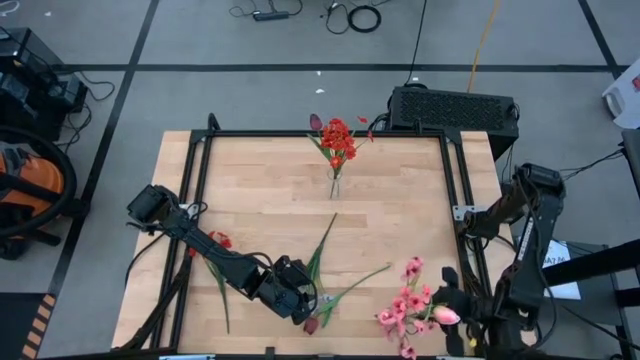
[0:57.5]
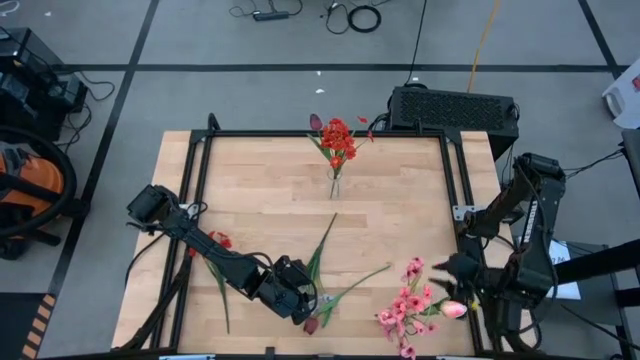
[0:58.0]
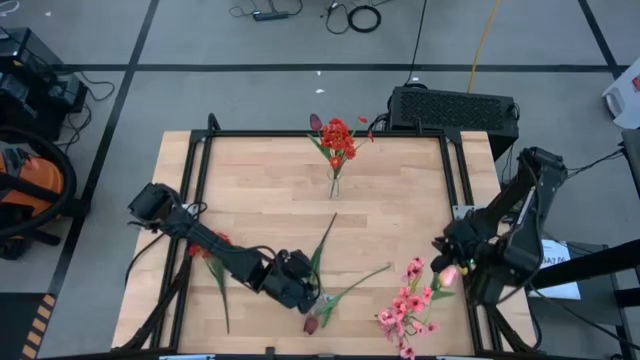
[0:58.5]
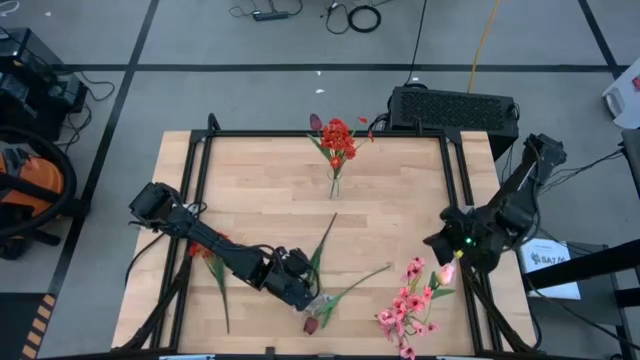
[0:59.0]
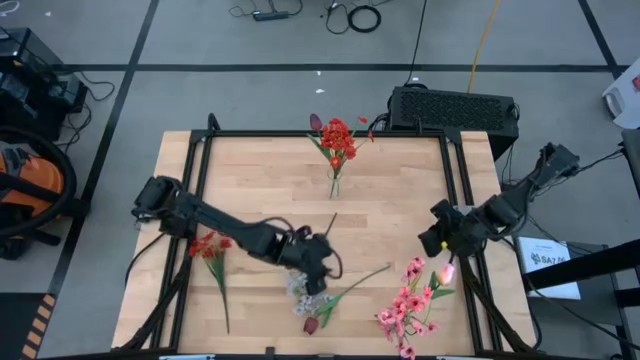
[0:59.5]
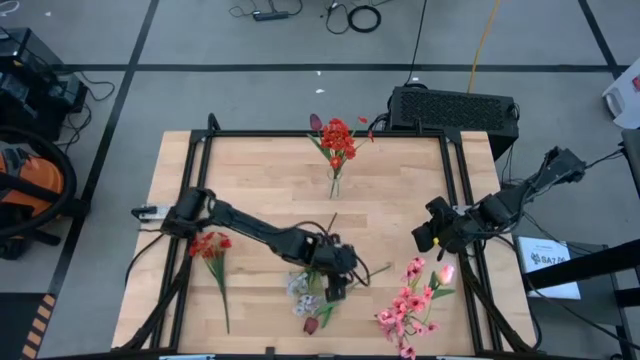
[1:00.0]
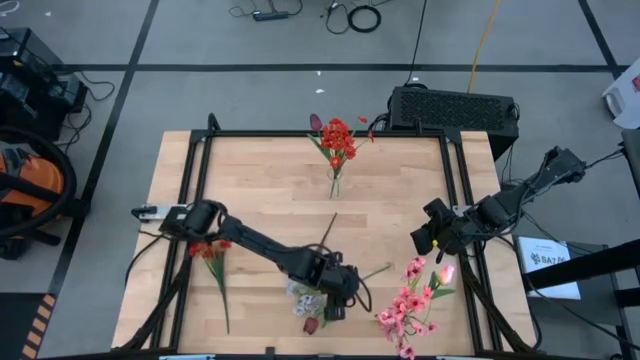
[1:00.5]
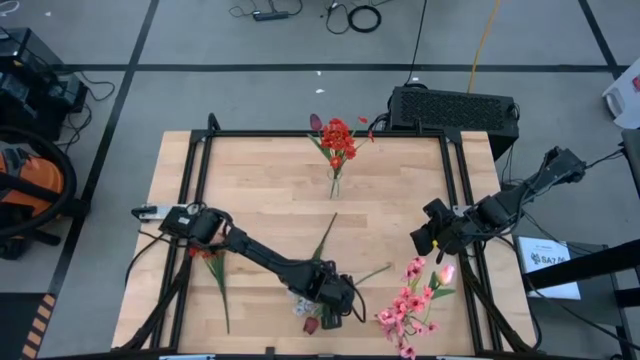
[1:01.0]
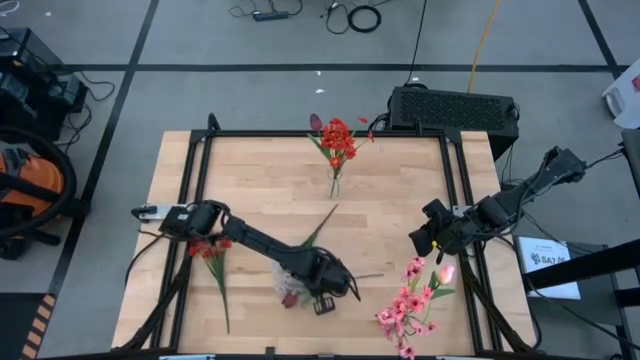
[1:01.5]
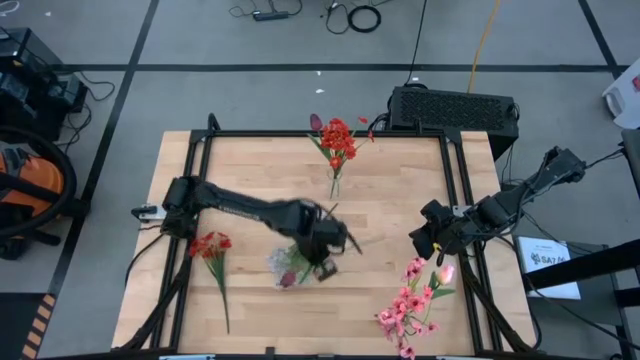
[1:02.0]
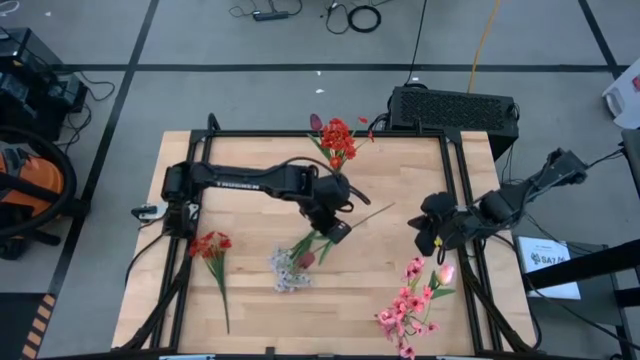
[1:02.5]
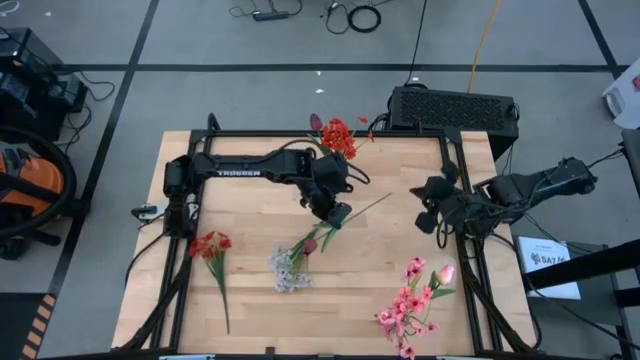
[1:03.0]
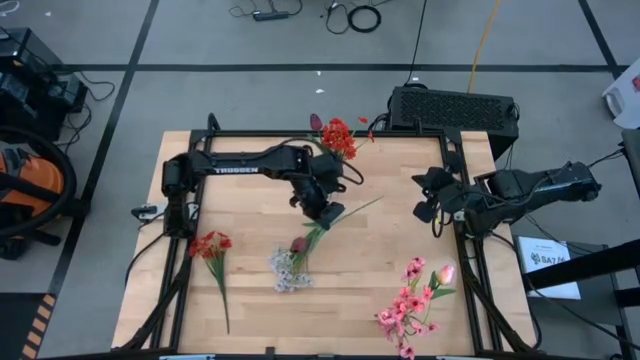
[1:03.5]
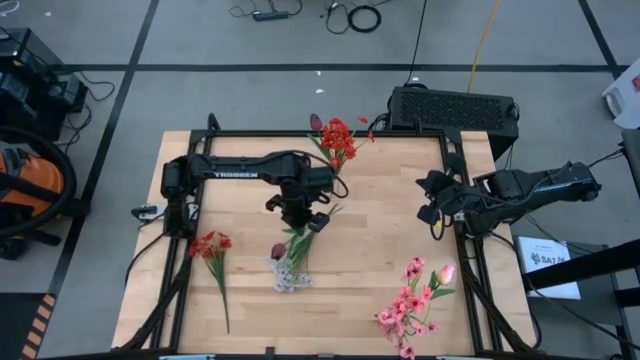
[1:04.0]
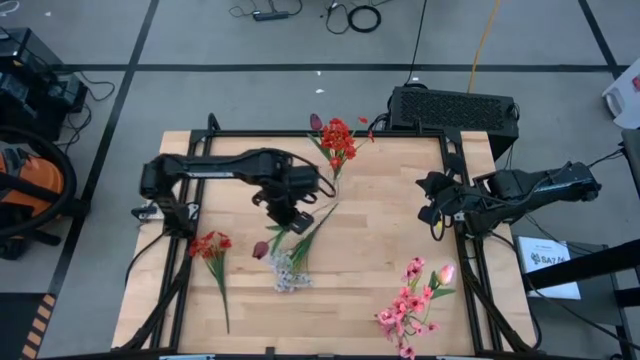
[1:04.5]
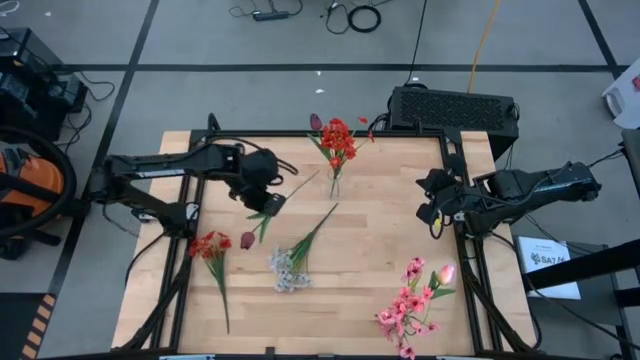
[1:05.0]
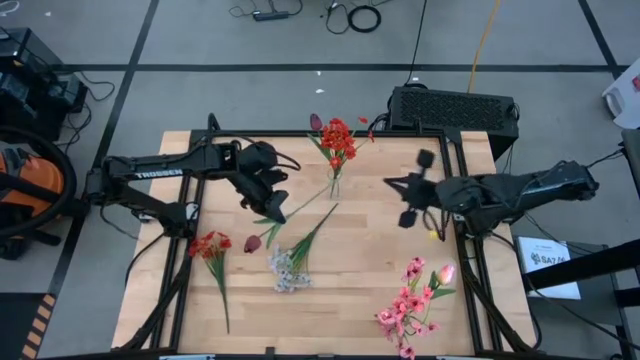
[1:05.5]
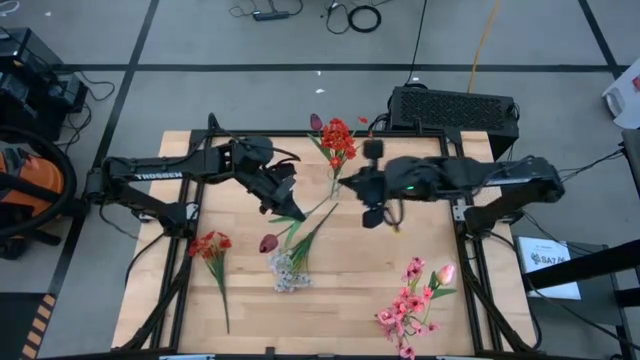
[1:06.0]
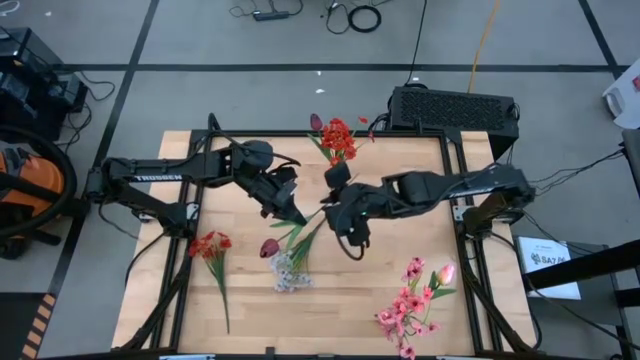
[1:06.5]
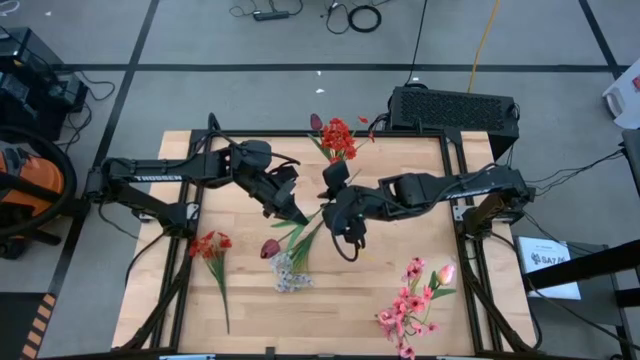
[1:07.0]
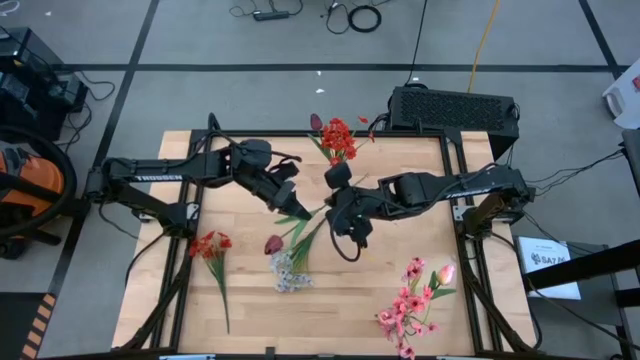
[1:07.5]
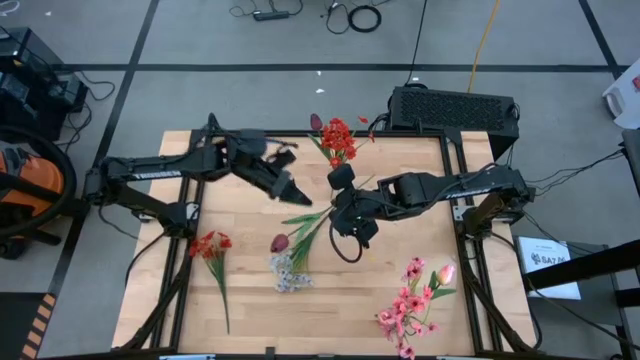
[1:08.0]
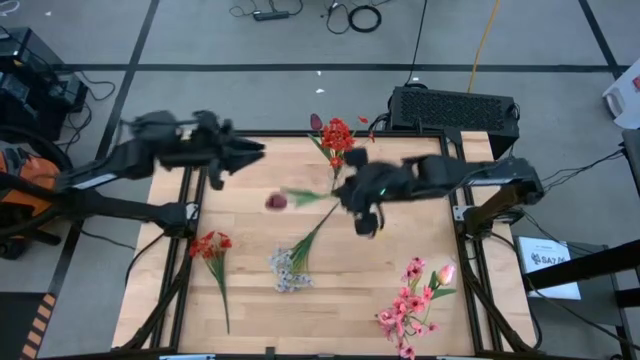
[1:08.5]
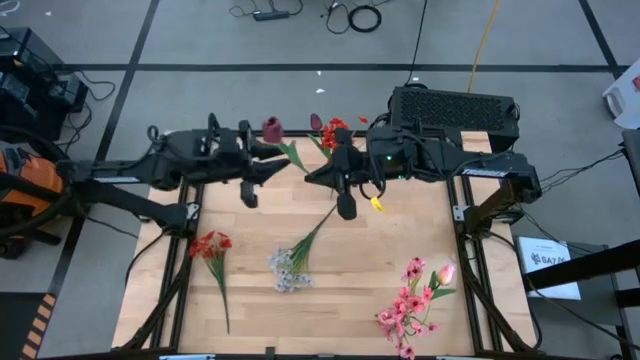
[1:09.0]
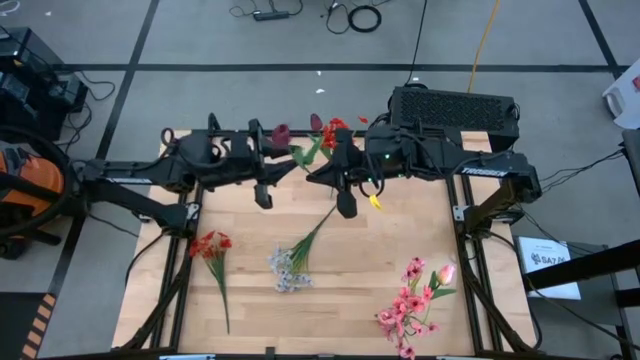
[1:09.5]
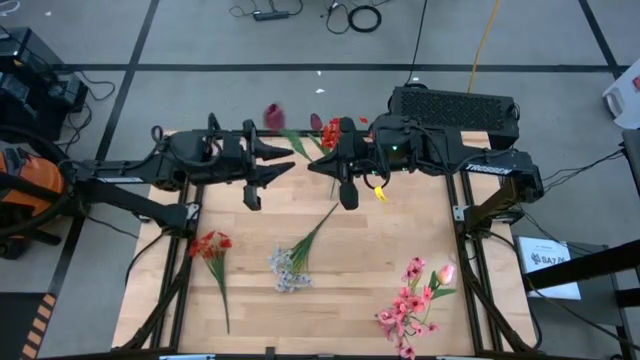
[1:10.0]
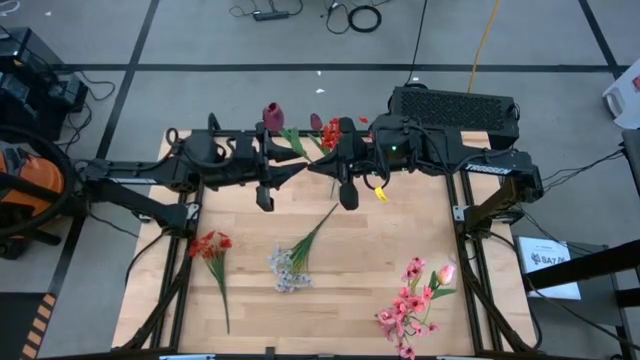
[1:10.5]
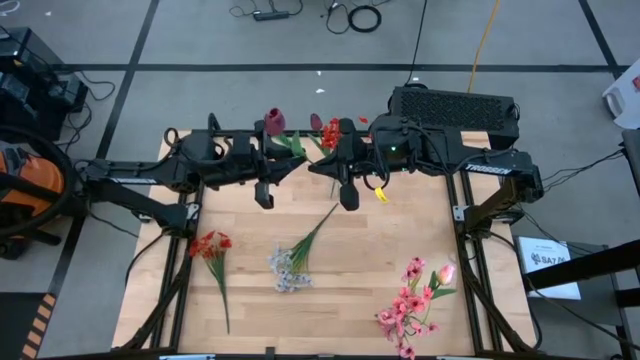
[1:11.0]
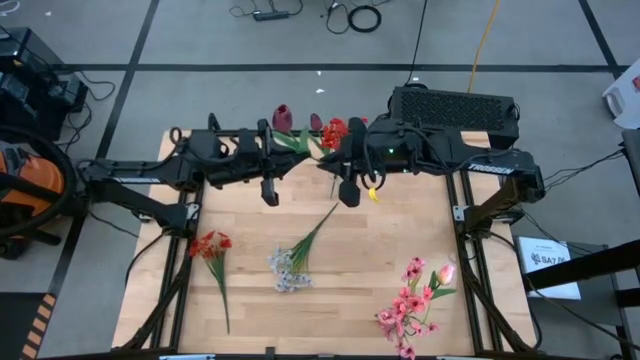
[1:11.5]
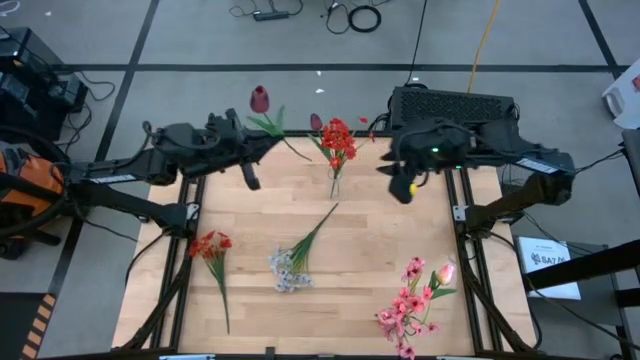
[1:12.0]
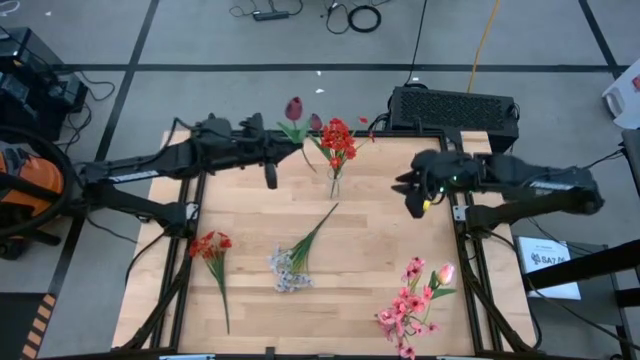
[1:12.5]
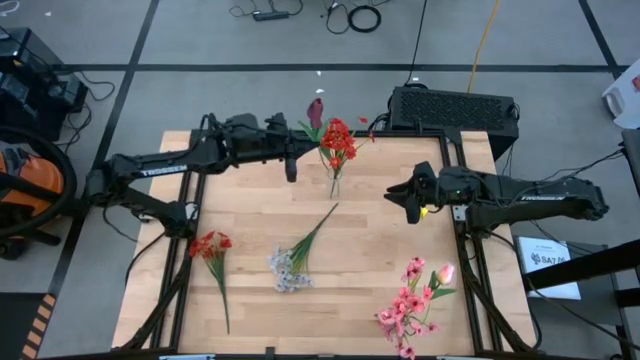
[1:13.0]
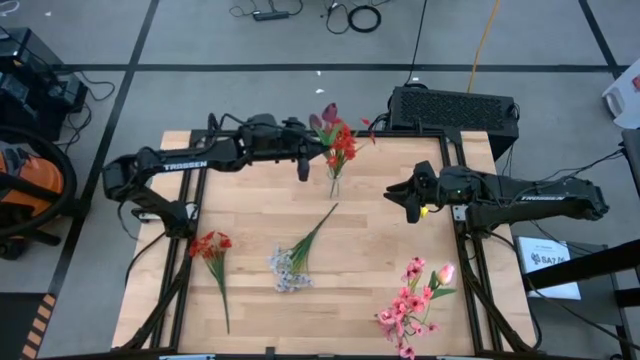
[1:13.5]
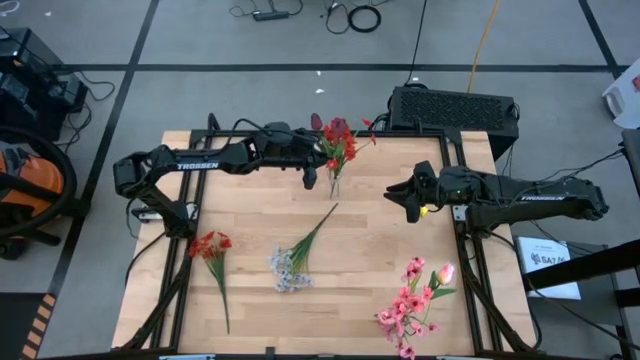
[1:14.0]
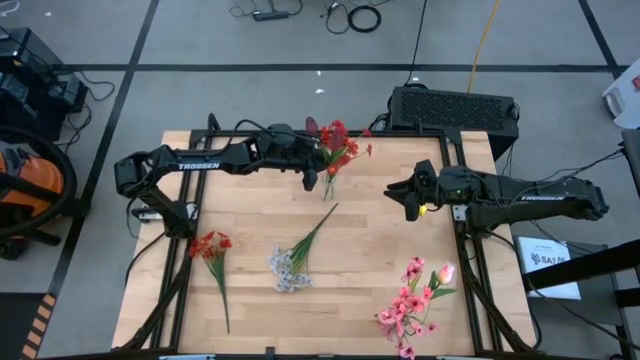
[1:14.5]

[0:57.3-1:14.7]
Task: Sort flowers into vase by color
Put the dark red flower into the transparent vase

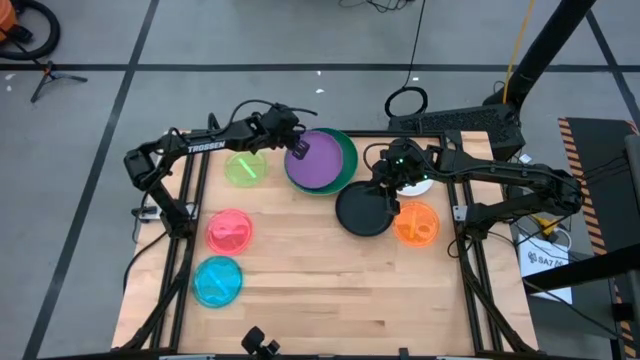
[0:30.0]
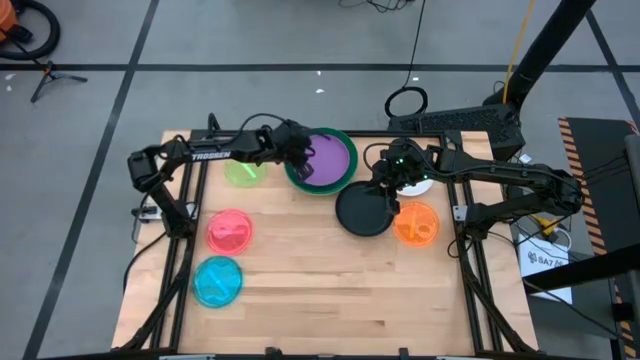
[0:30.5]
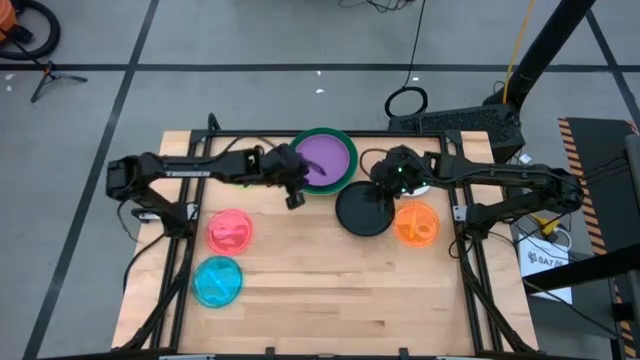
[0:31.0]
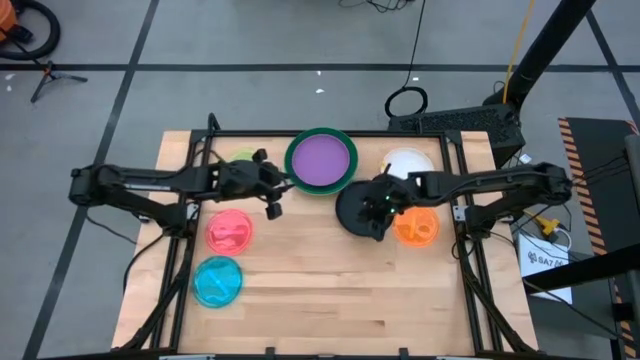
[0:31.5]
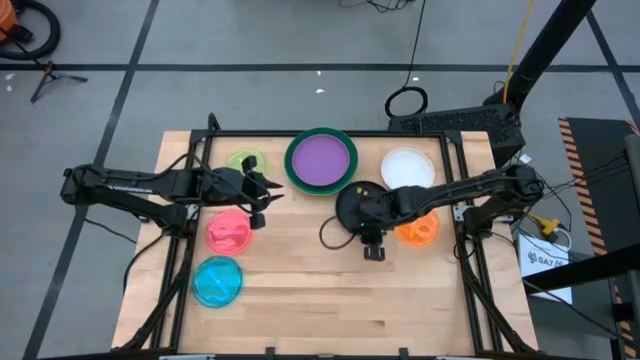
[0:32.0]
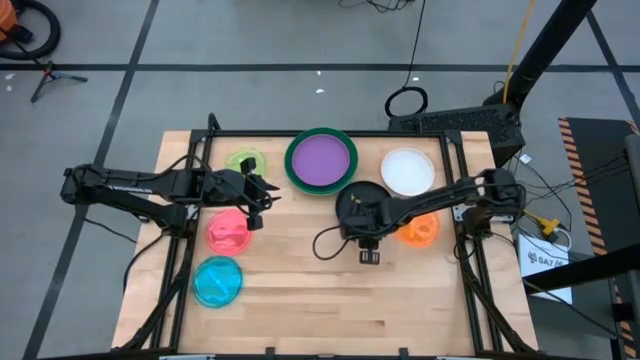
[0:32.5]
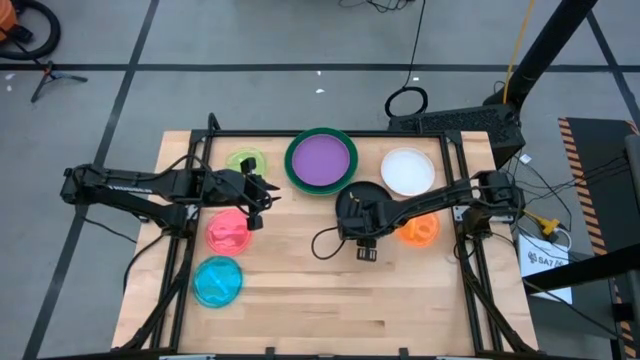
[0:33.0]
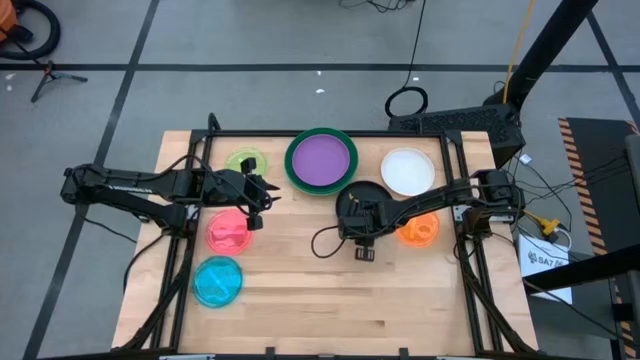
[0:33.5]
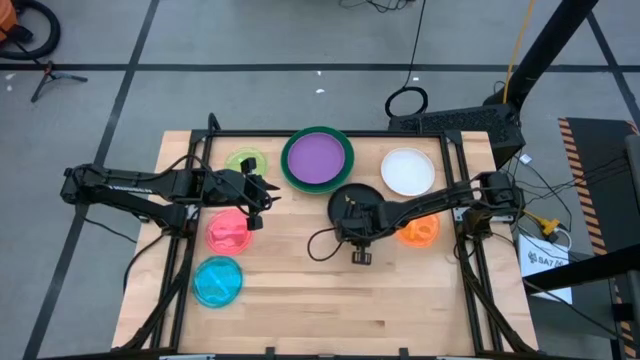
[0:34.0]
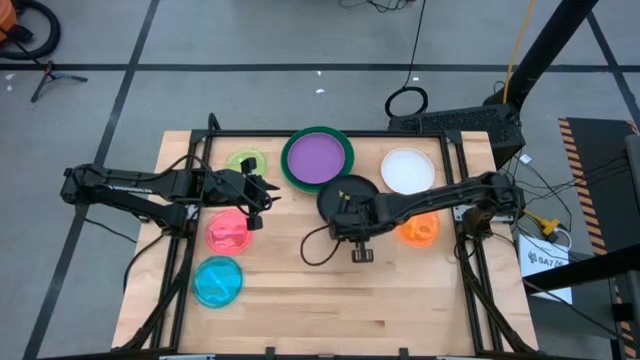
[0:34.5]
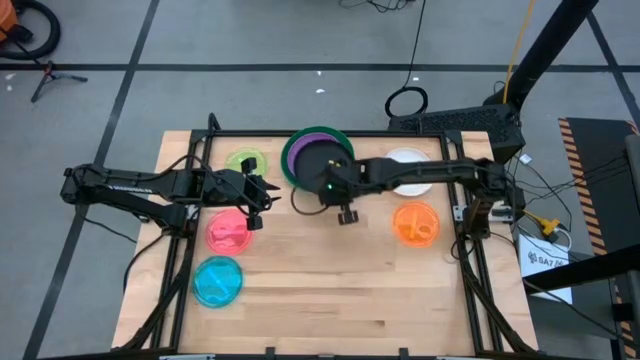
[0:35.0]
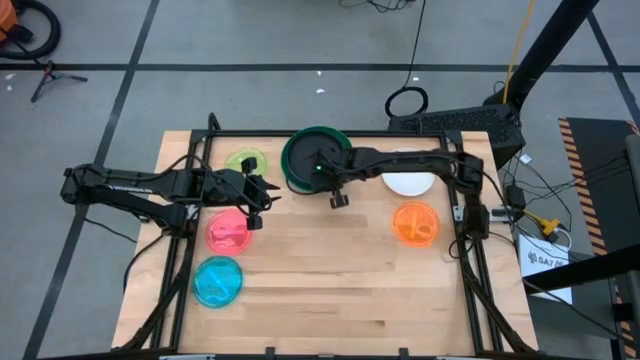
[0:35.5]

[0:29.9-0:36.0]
Task: Stack plastic plates
Stack the black plate on top of the purple plate
